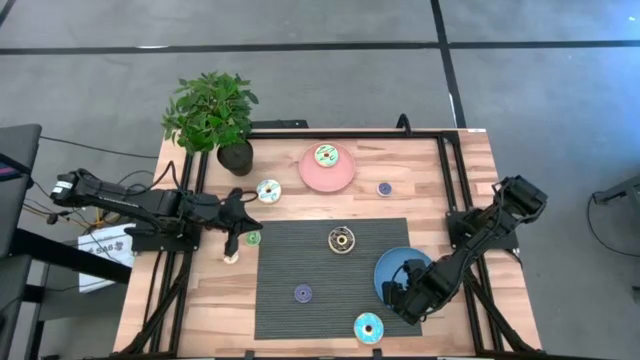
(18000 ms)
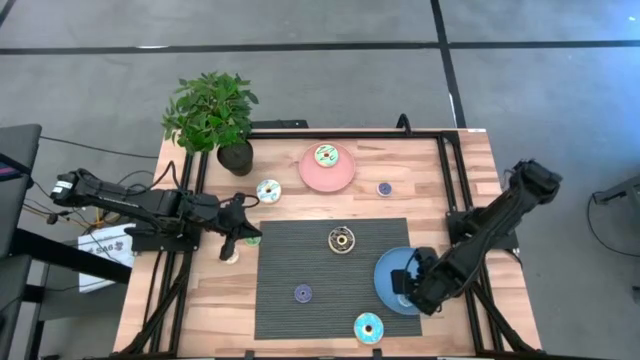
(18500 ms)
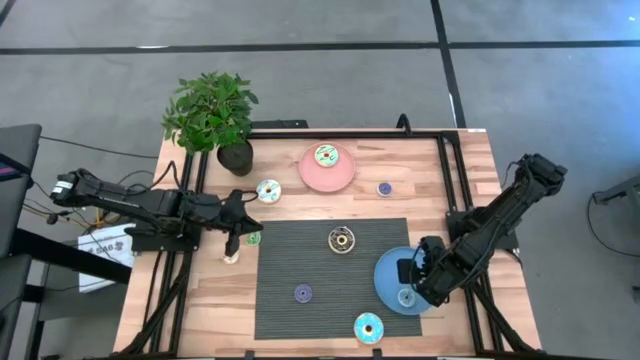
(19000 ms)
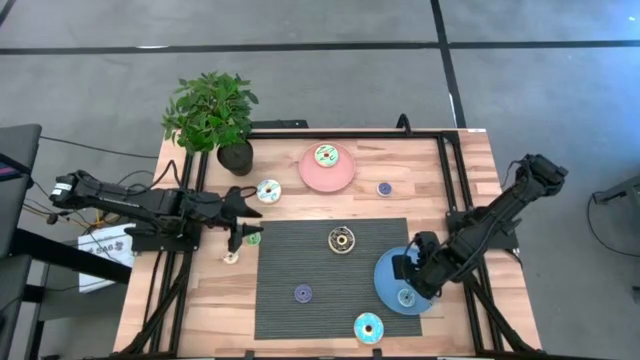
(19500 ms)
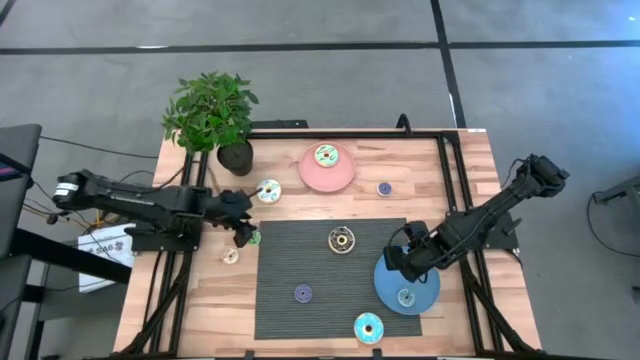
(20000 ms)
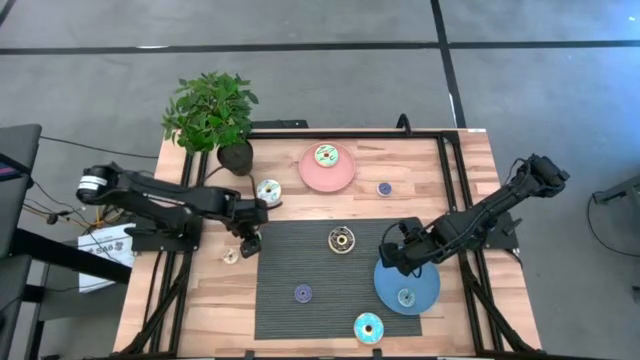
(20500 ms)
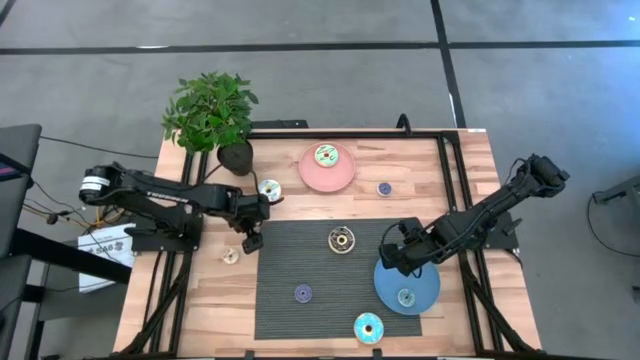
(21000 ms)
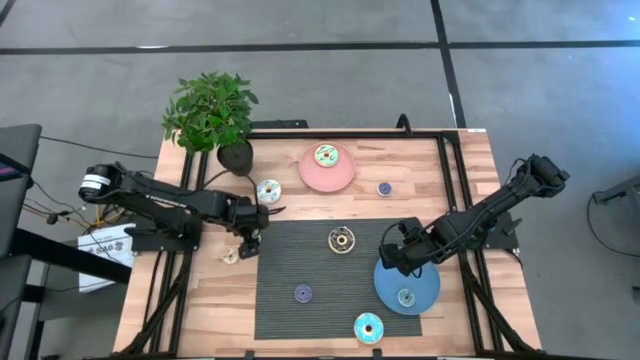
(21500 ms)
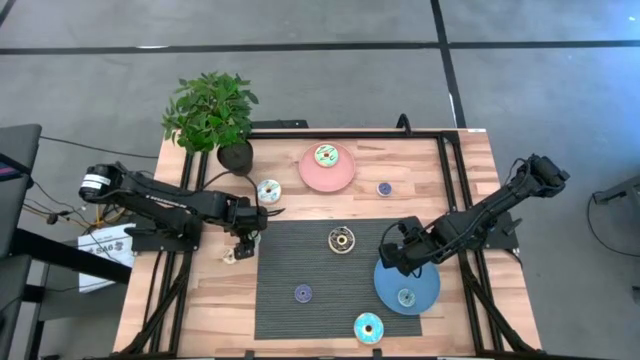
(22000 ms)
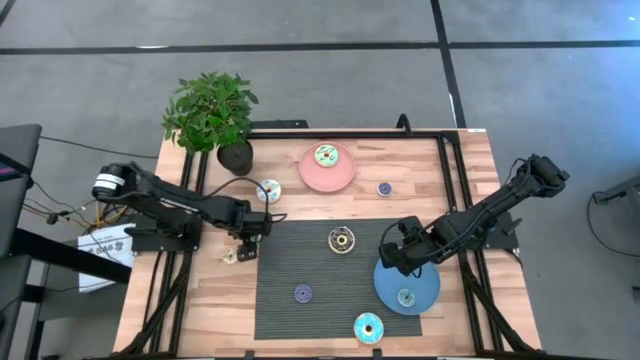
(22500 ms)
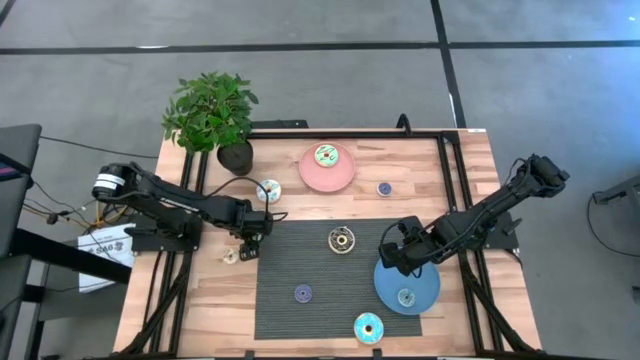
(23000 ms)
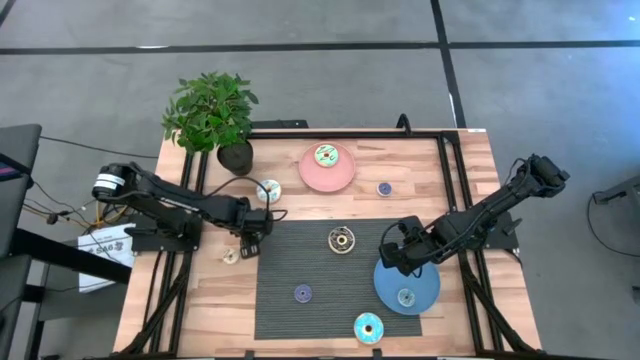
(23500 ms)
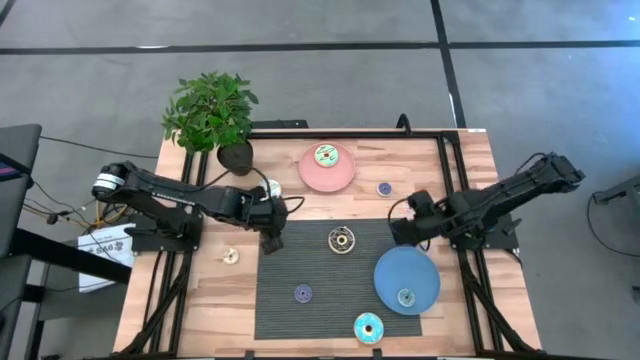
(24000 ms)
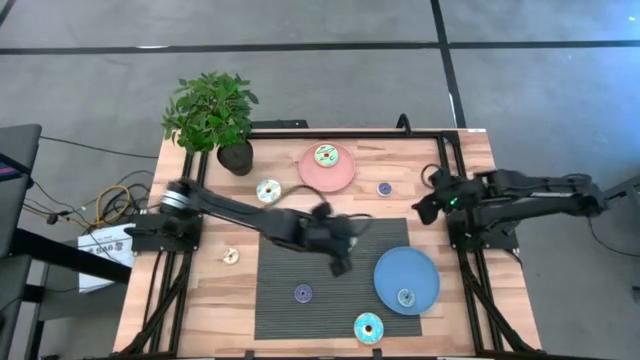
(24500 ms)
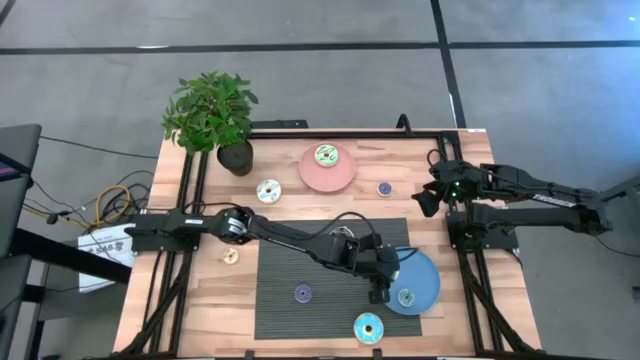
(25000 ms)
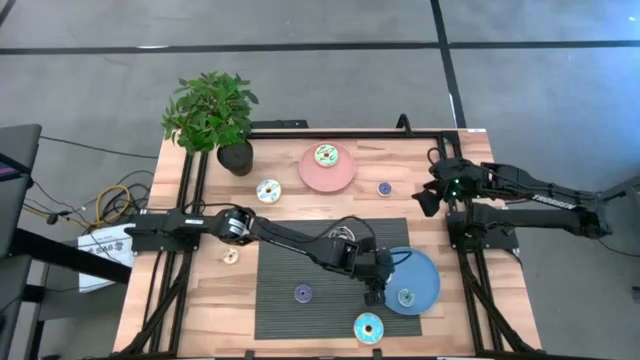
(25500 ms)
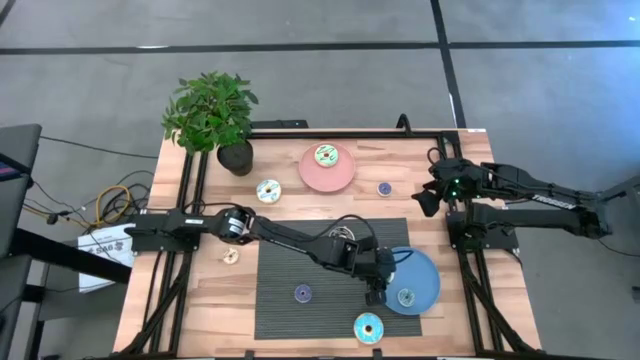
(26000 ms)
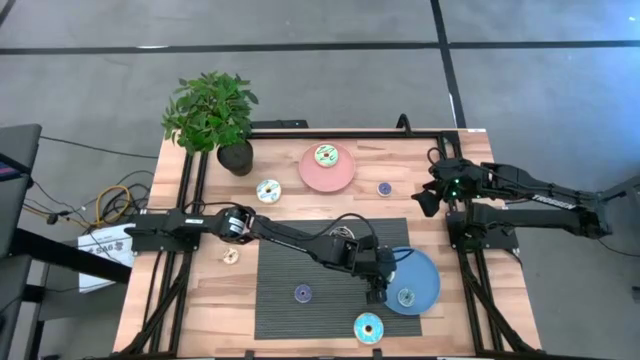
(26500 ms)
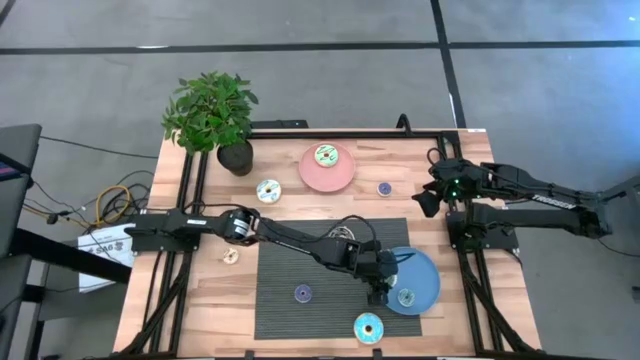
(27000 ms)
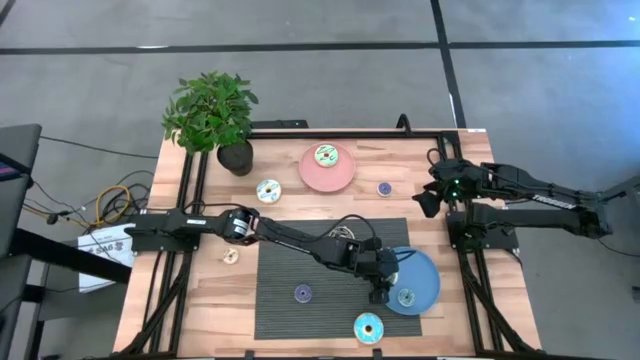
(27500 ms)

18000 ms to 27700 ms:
Task: Pick & Place donuts
Put the small green donut on the blue plate

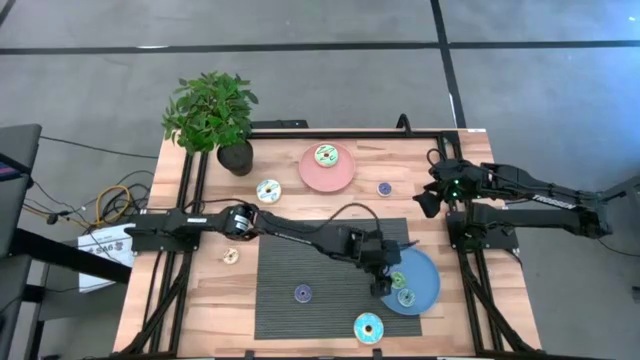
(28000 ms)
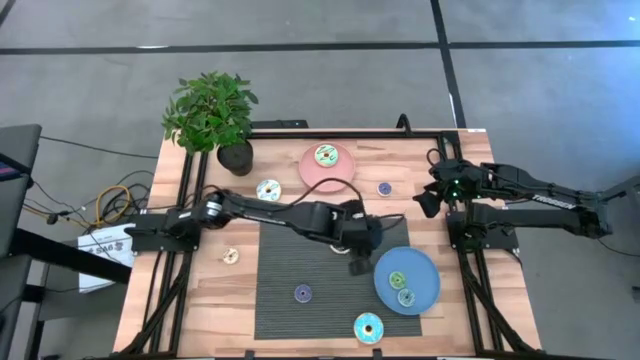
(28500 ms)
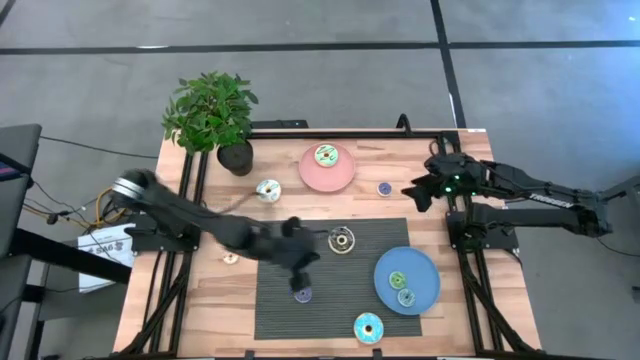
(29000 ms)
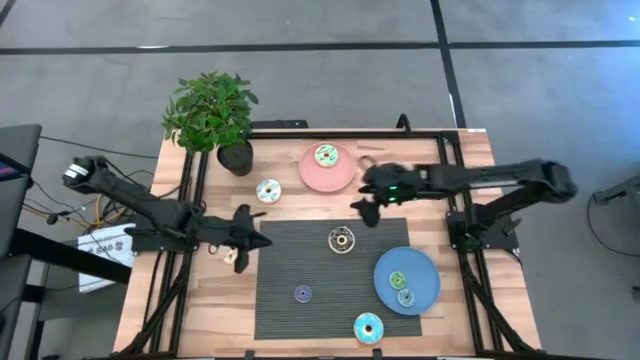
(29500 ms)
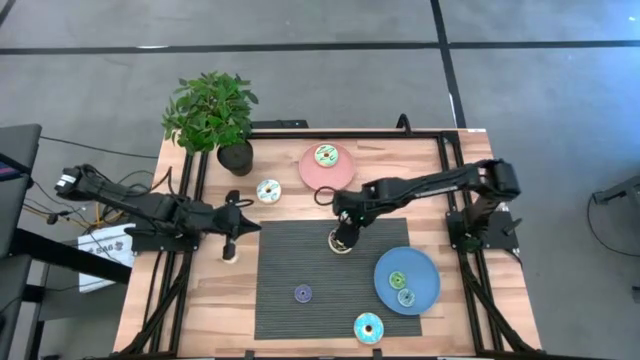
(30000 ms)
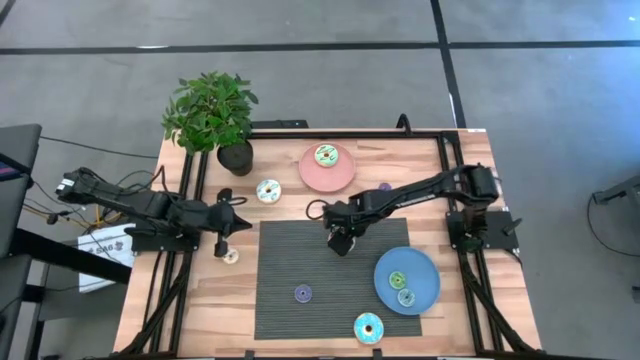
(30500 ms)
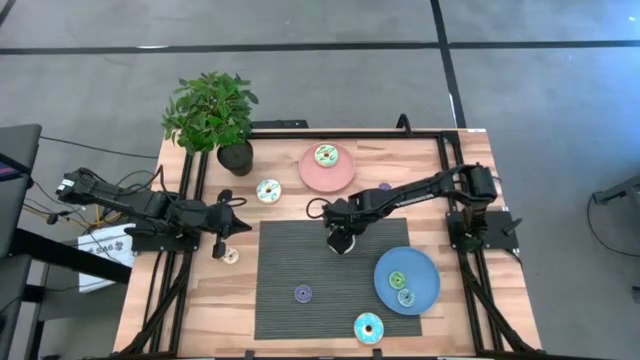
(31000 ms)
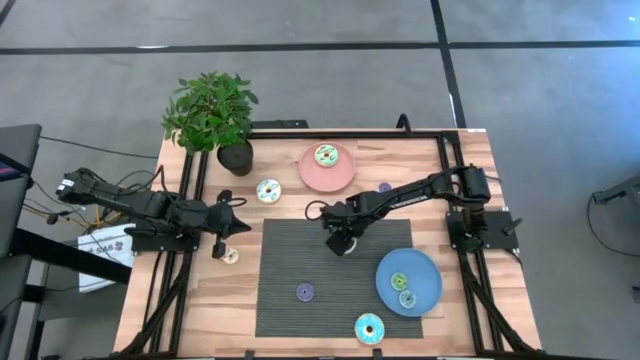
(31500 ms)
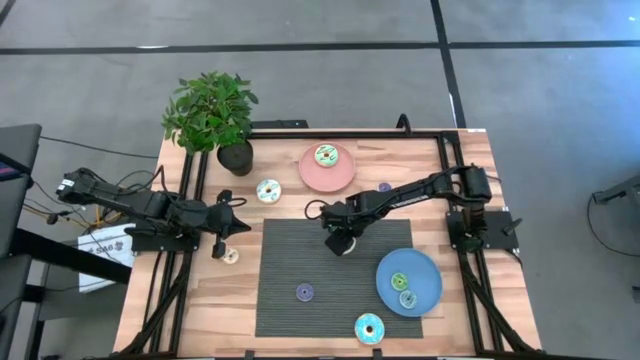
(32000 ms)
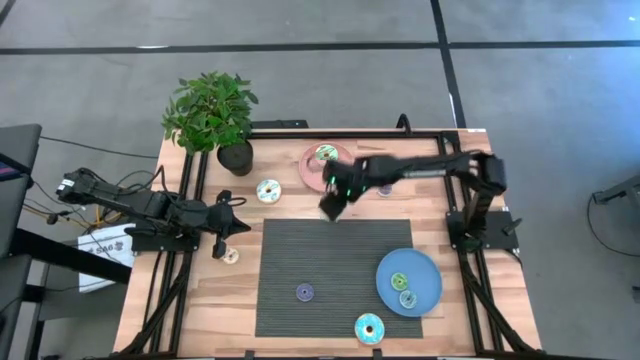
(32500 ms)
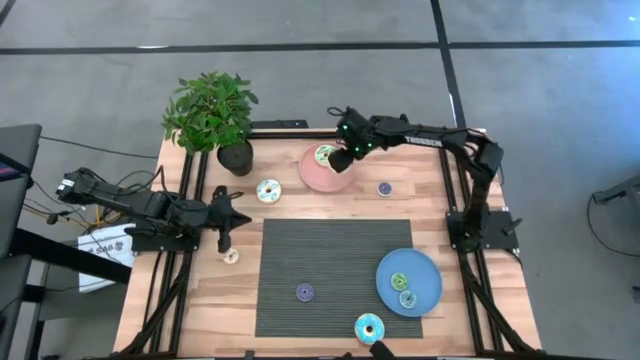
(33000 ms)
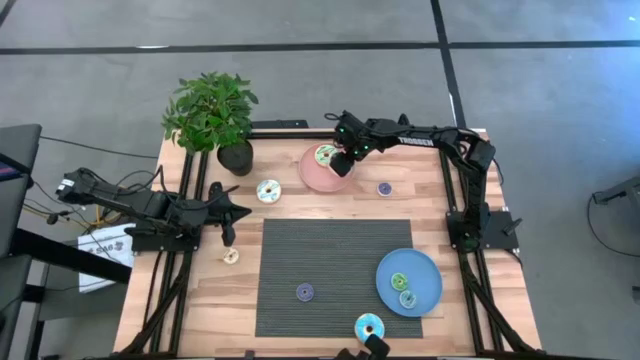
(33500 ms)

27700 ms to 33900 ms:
Put the large black donut on the pink plate

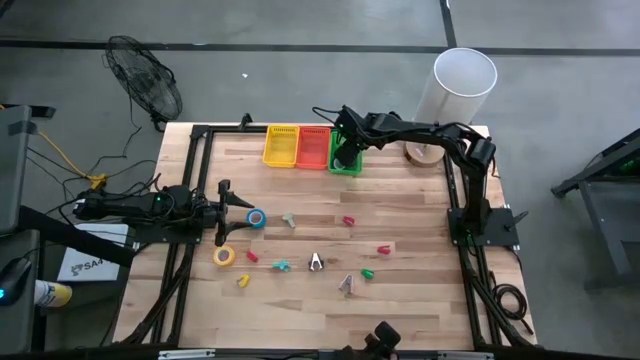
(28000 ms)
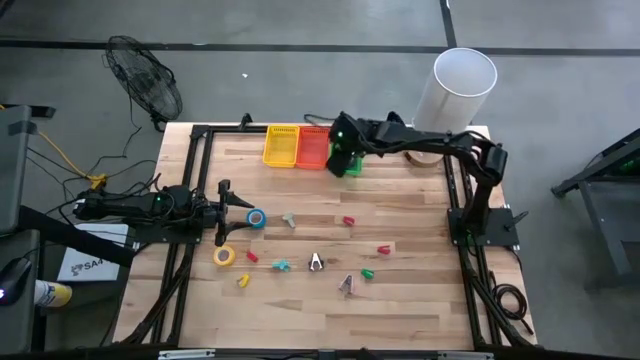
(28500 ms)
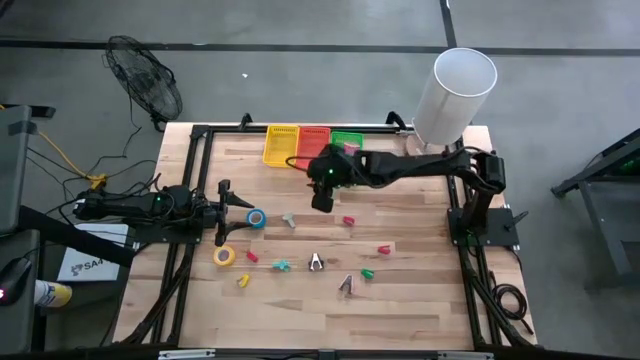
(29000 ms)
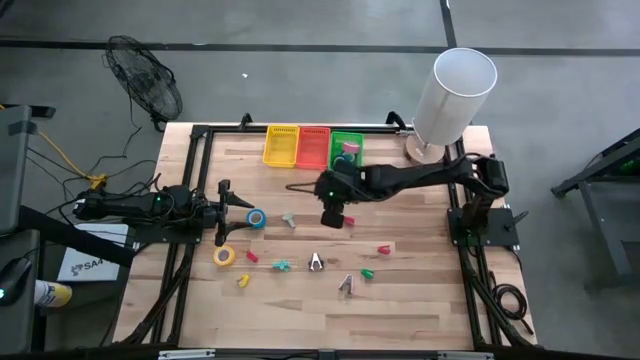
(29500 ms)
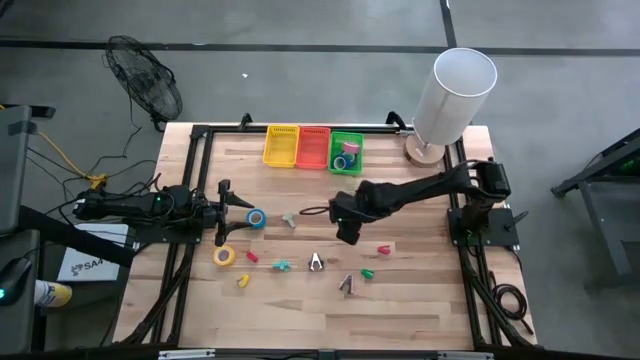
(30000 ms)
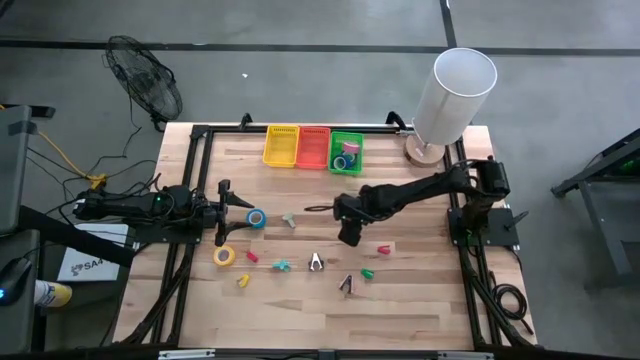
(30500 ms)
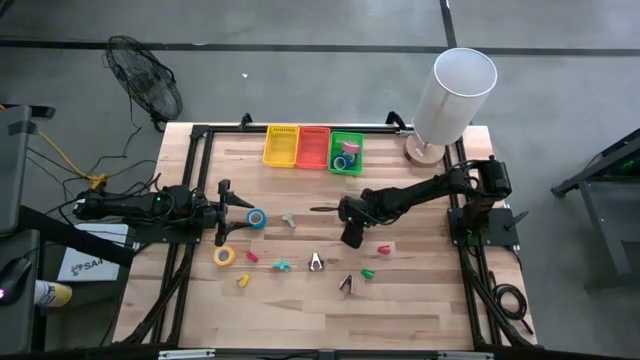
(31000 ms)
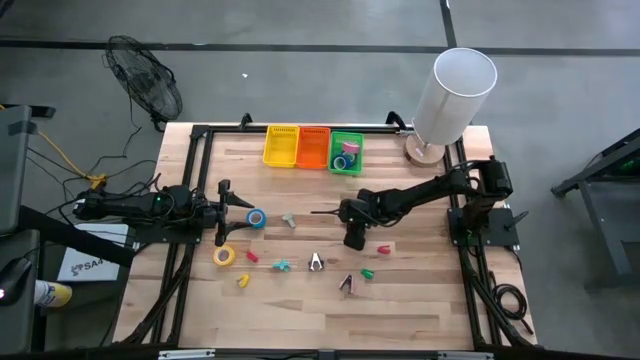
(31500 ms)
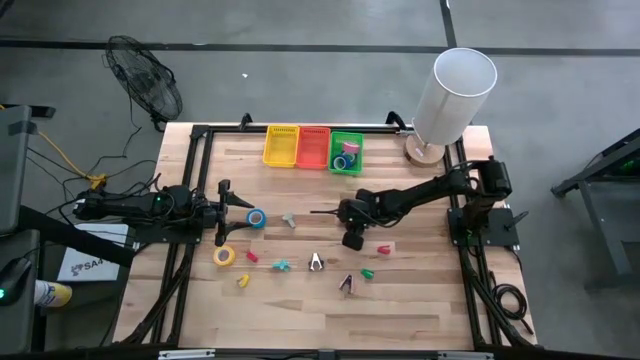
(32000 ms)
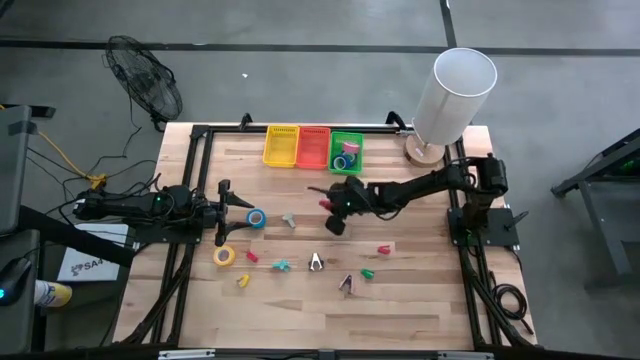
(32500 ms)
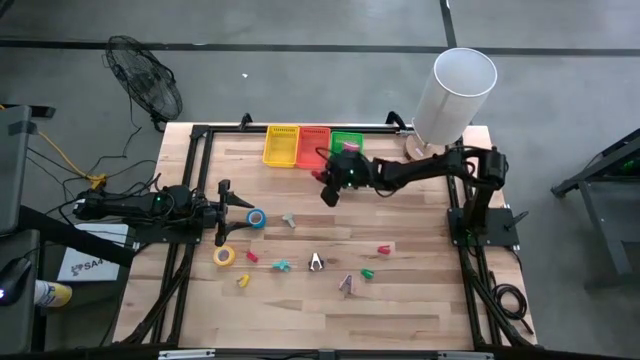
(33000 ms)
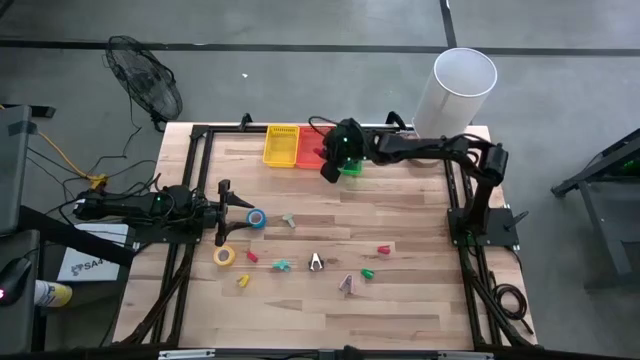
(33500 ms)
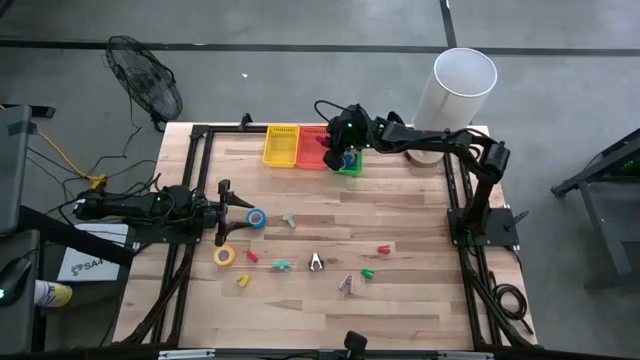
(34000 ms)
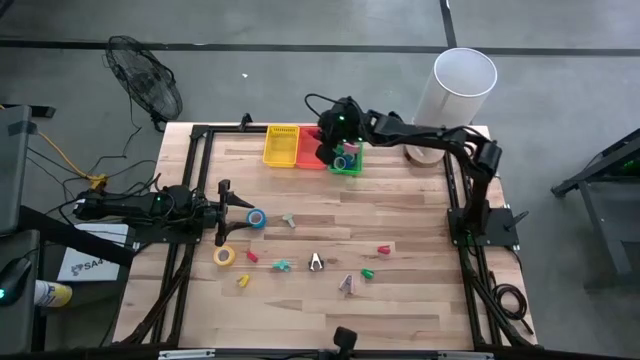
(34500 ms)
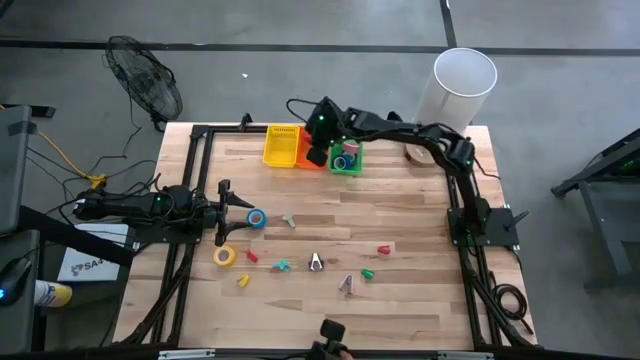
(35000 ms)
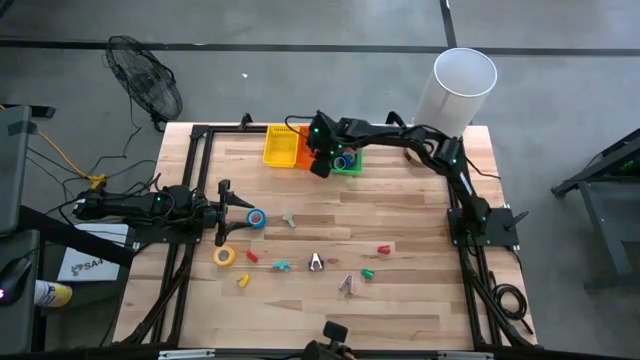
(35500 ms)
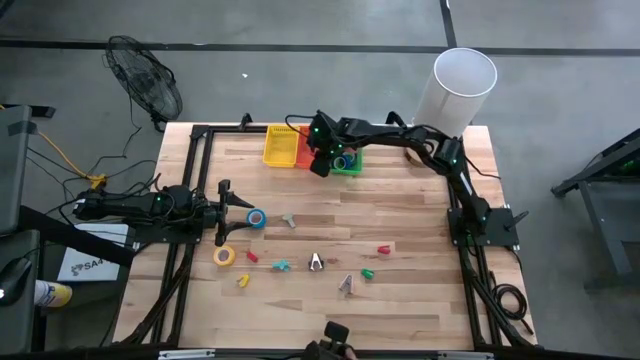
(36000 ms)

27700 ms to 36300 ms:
Task: Pick and place Stapler, Stapler remover, tape
Put the top red stapler into the orange basket
